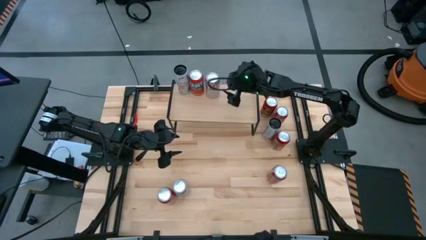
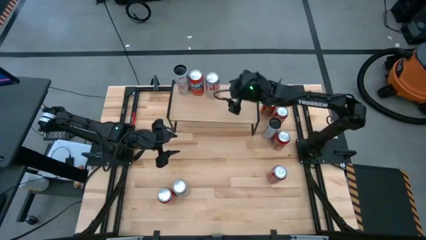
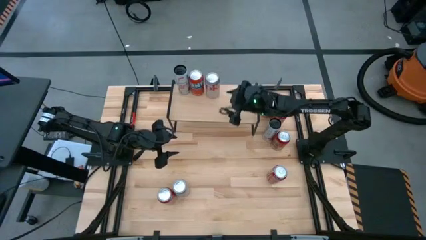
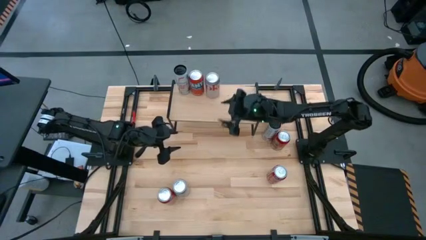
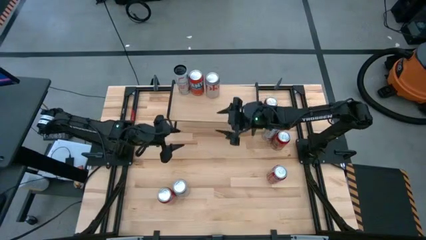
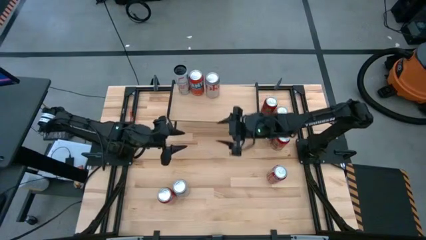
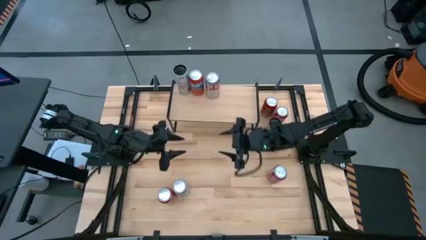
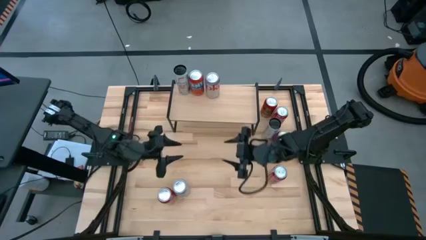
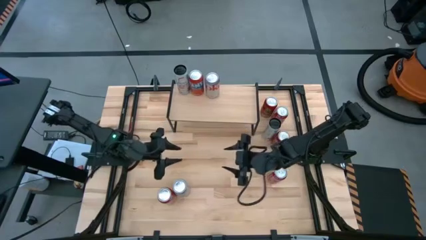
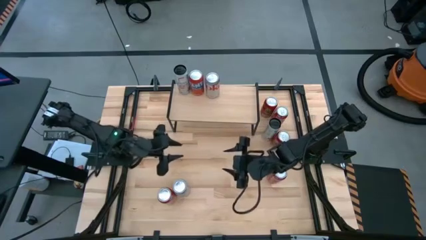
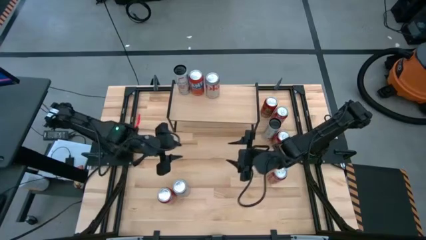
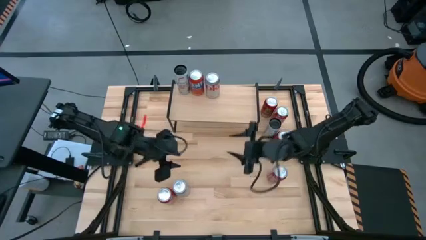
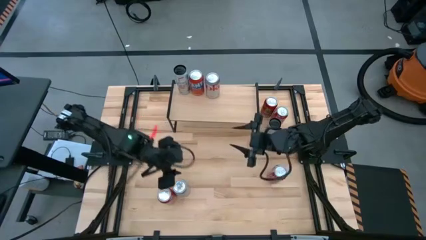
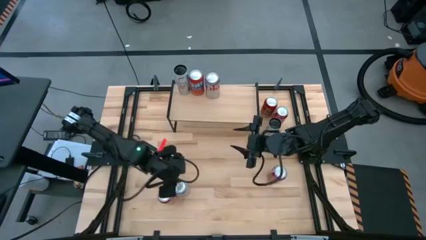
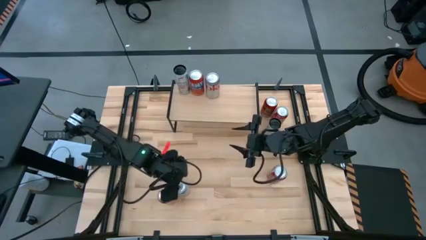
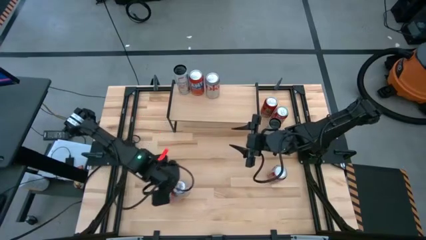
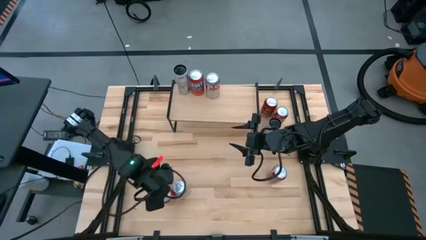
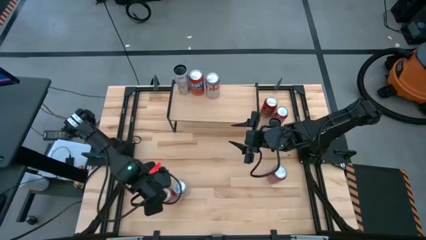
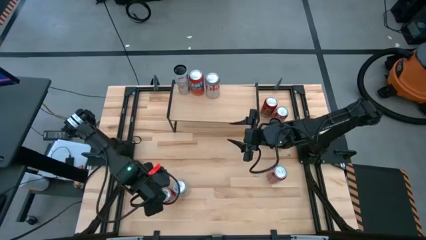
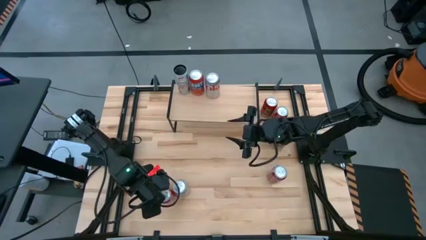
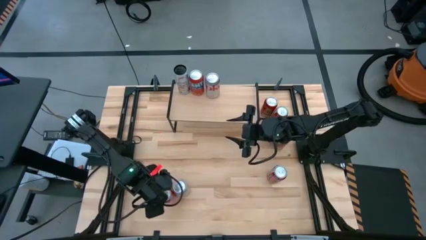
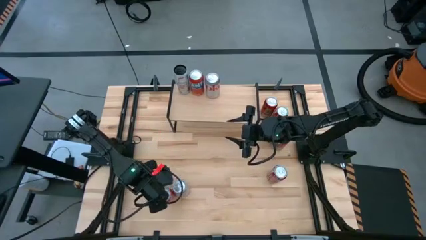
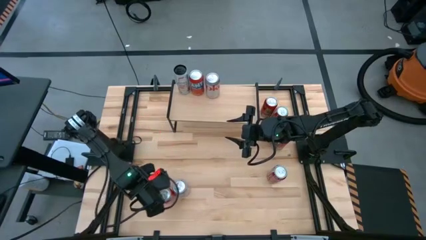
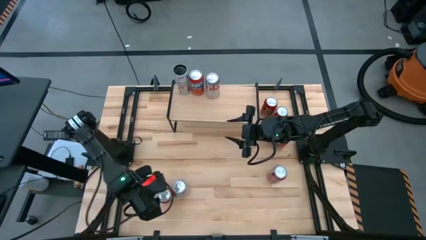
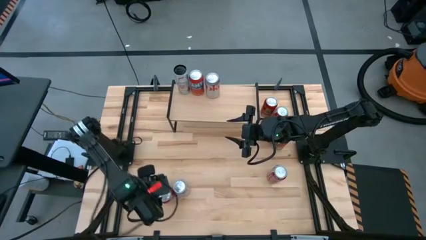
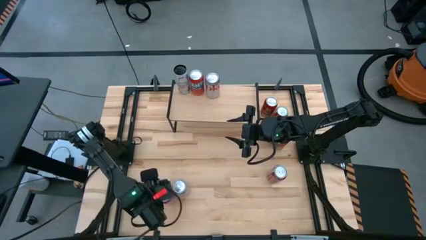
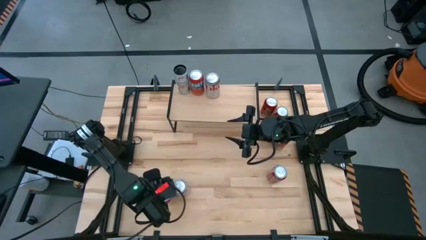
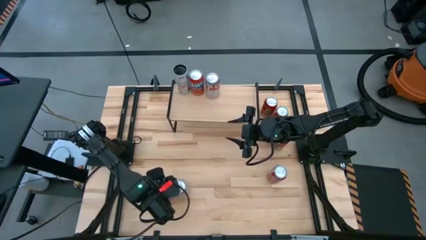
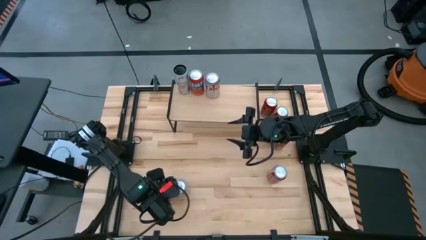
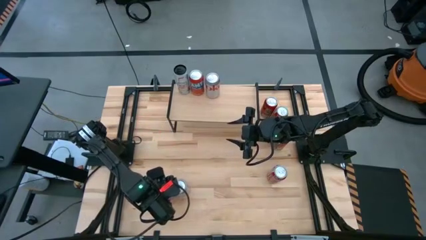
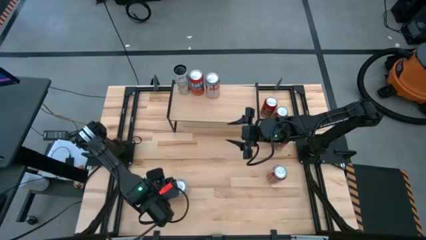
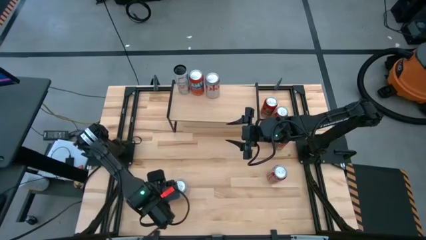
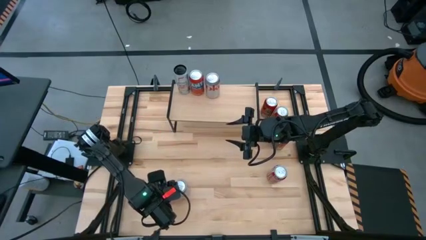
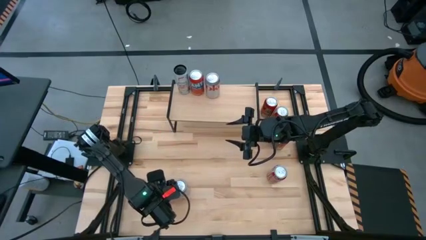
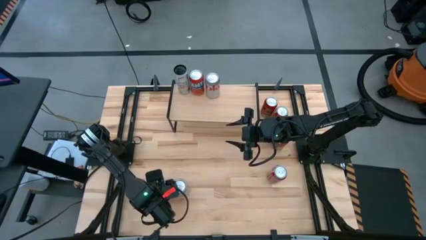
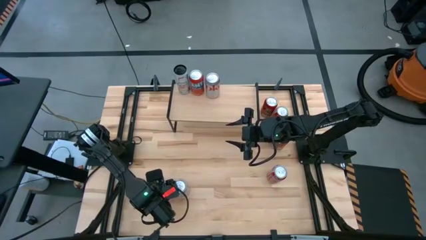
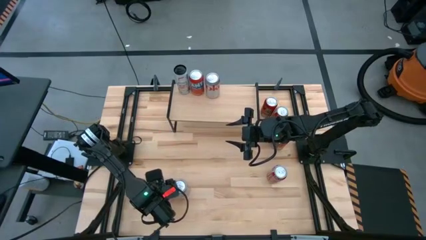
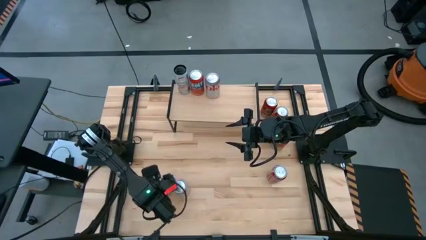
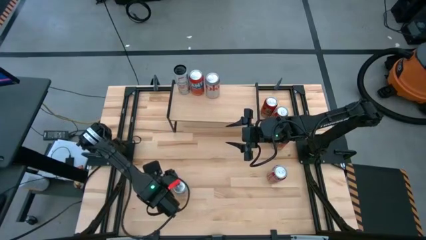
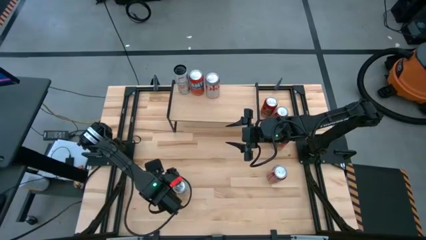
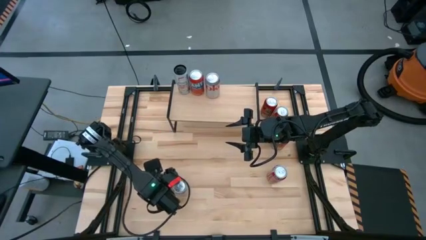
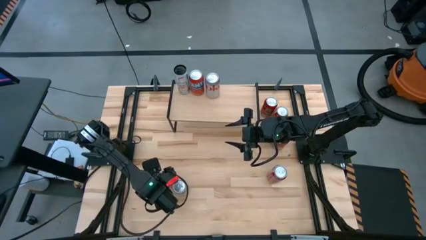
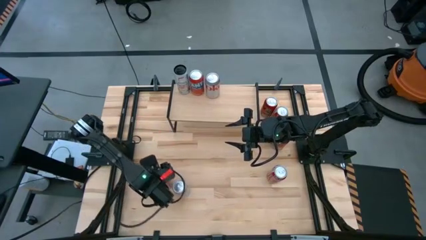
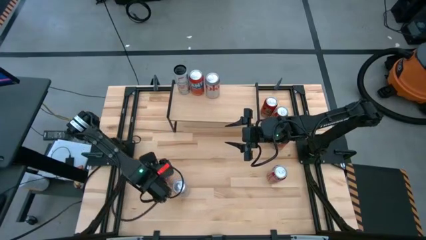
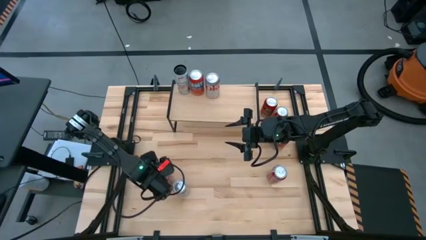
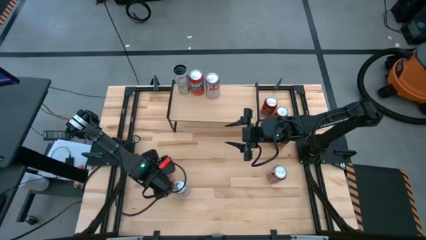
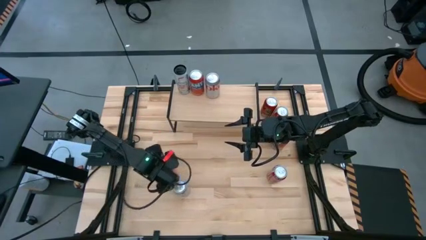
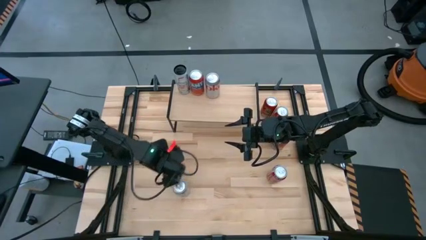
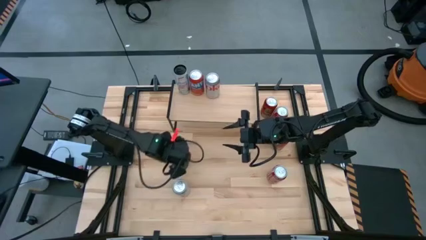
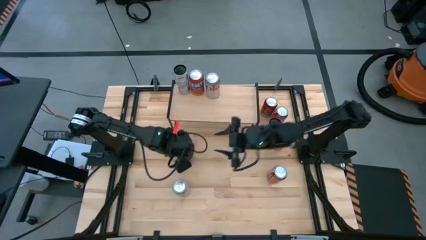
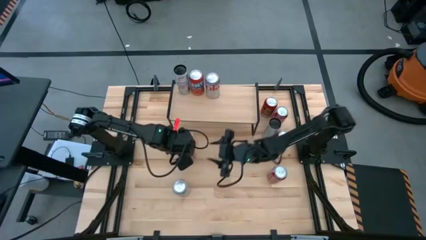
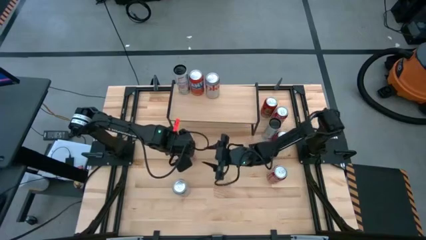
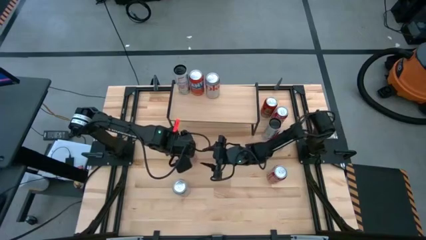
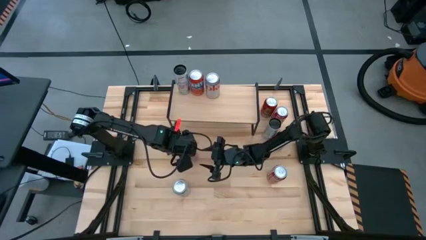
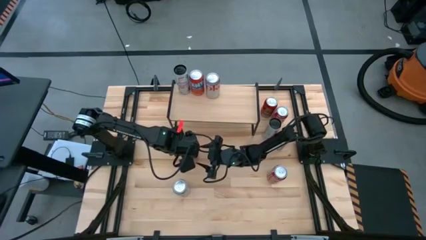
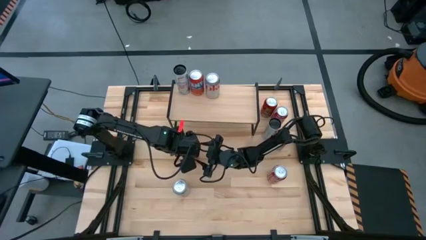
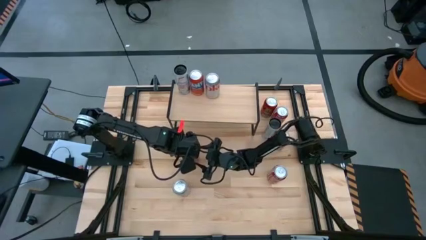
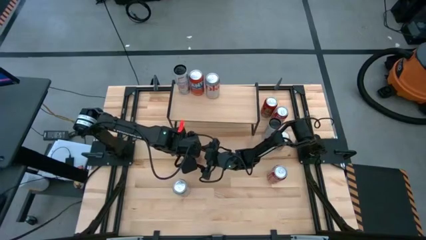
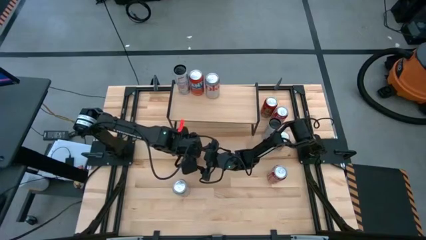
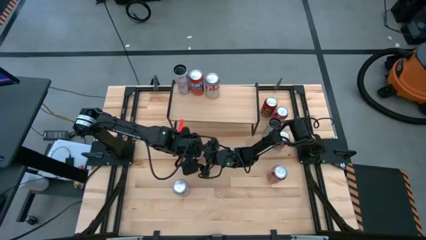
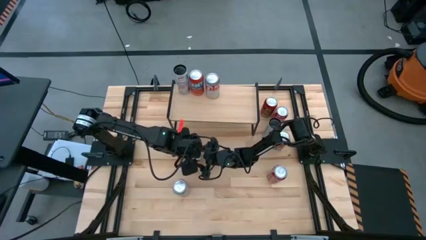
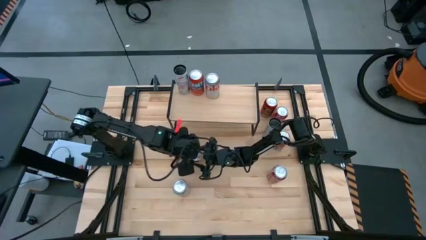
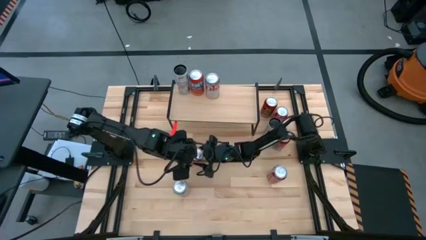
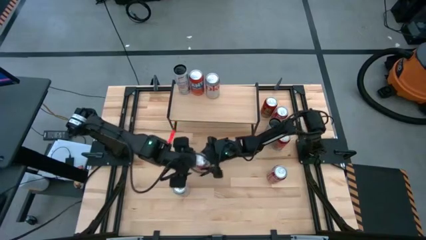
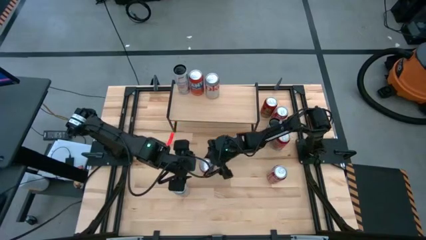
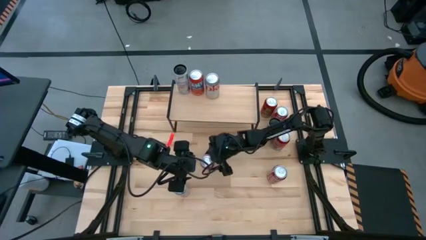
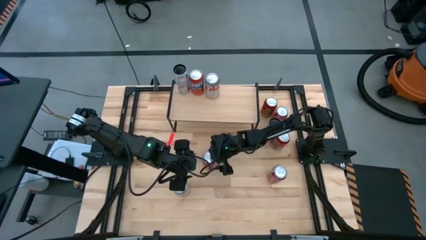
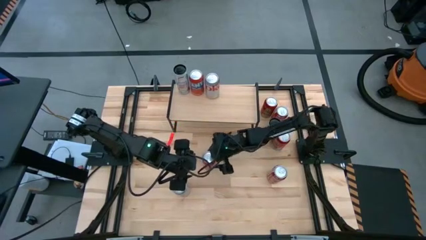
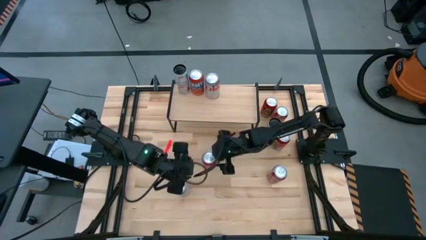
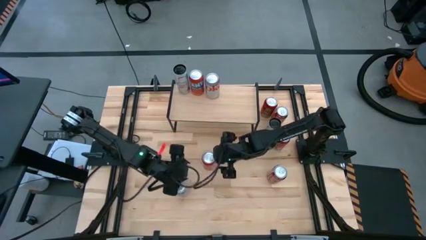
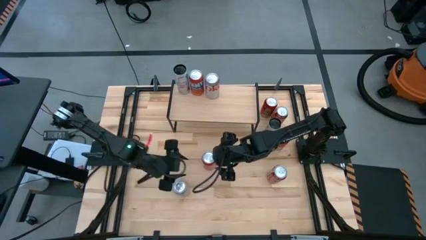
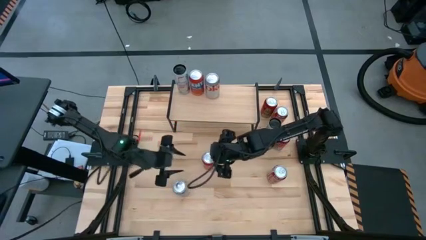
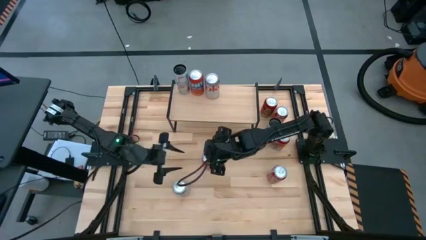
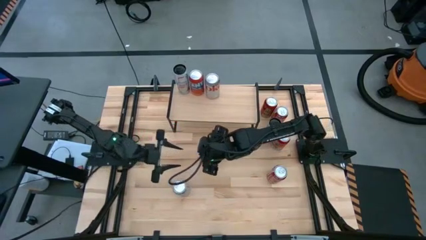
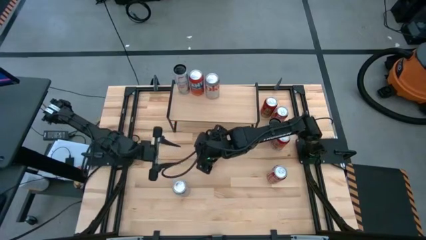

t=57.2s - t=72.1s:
Task: Place canned beverage on shelf
Put the center orange soda can on the shelf aligned with the other orange soda can
